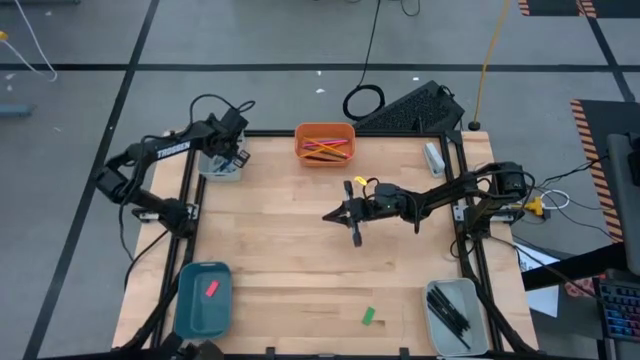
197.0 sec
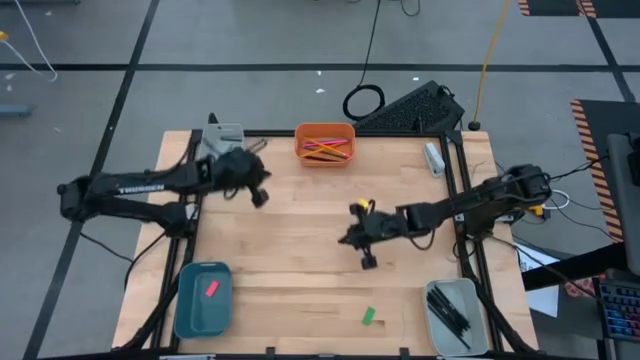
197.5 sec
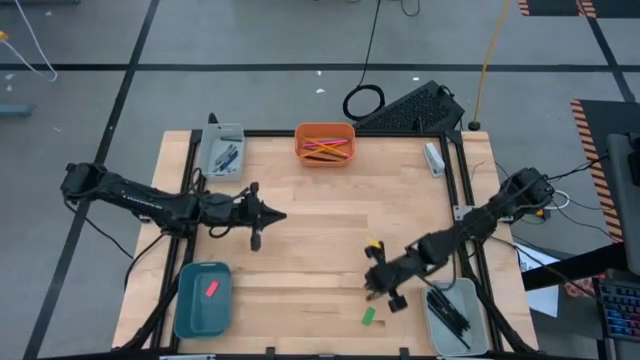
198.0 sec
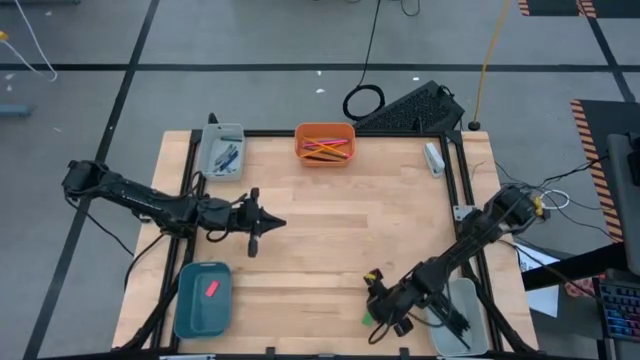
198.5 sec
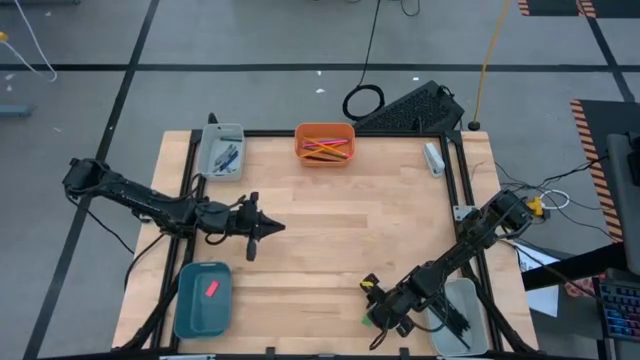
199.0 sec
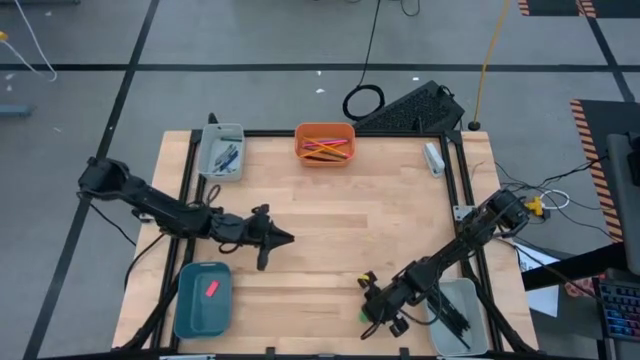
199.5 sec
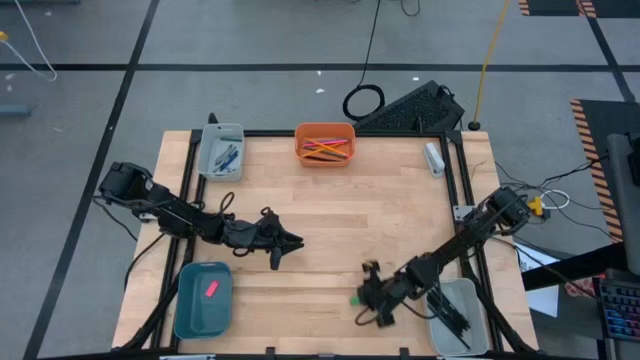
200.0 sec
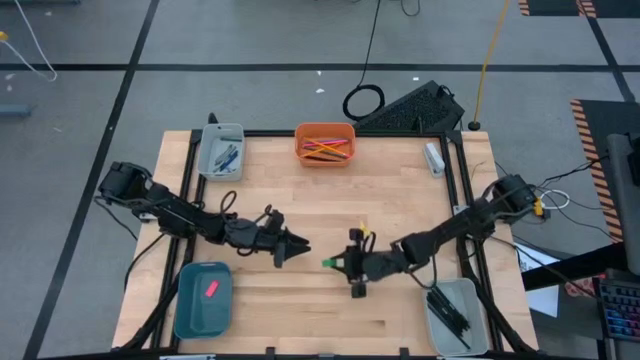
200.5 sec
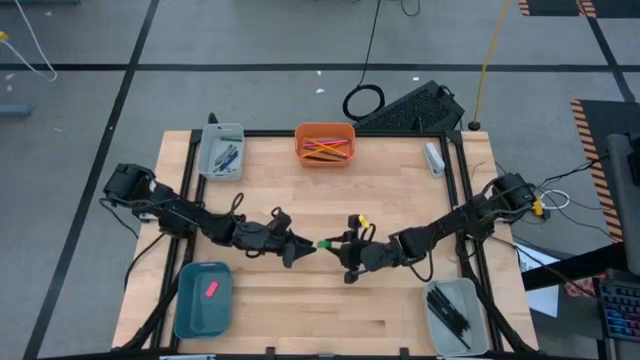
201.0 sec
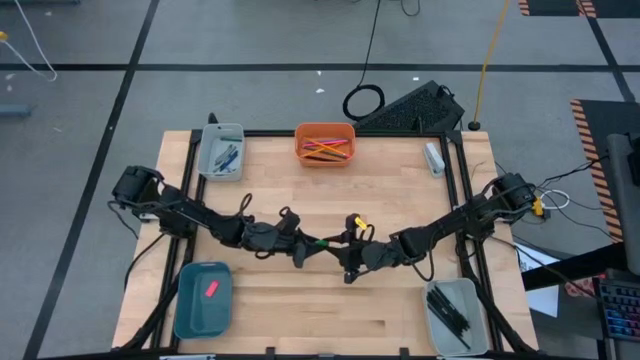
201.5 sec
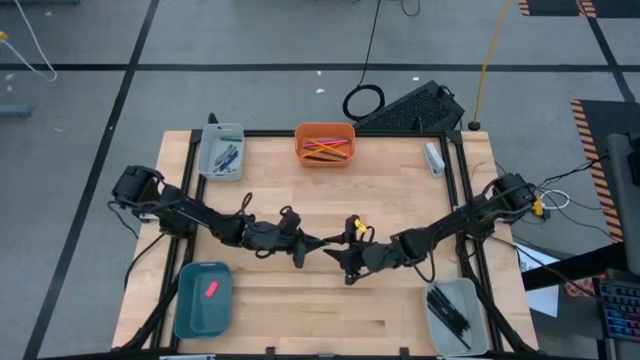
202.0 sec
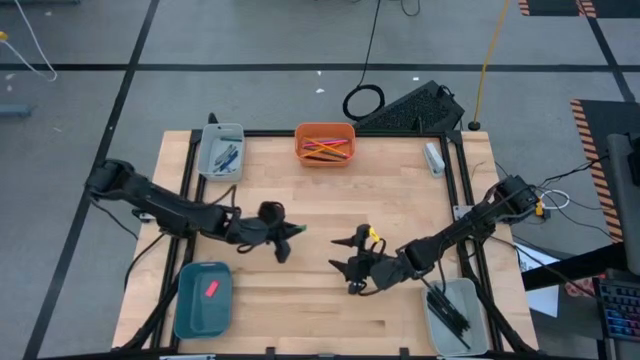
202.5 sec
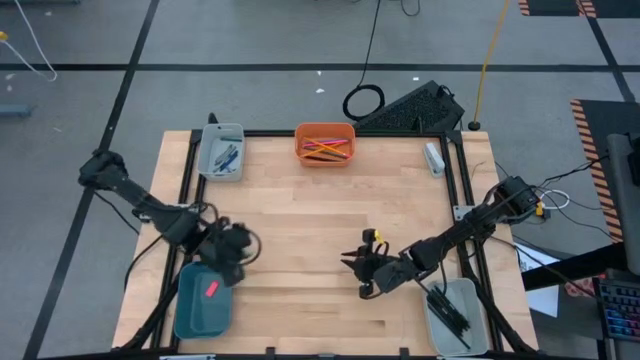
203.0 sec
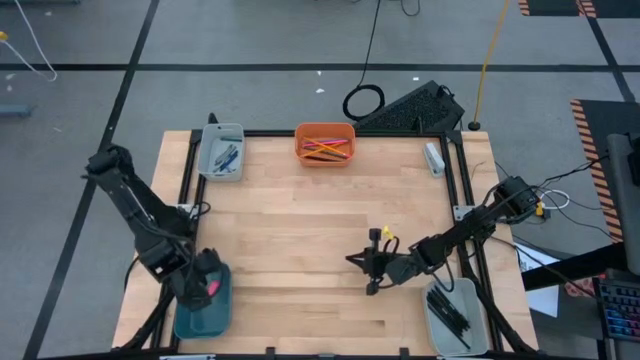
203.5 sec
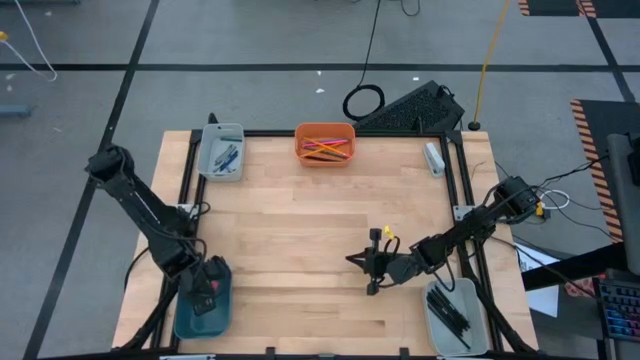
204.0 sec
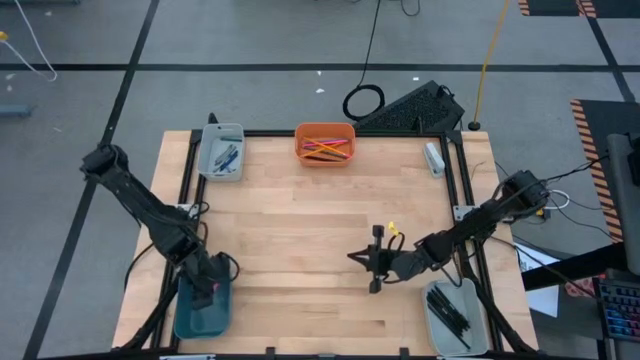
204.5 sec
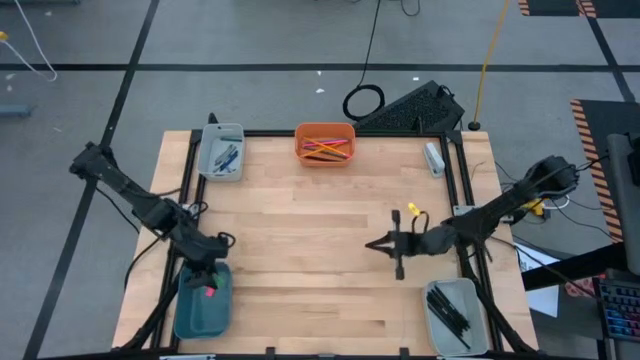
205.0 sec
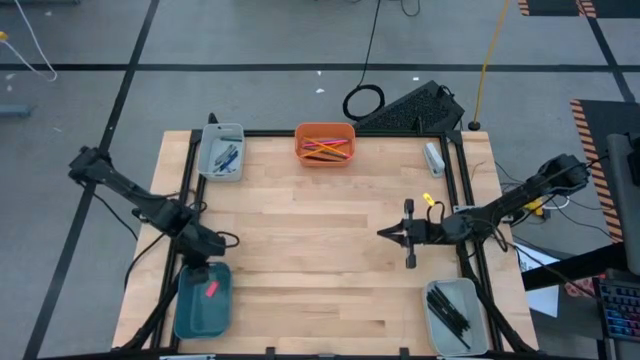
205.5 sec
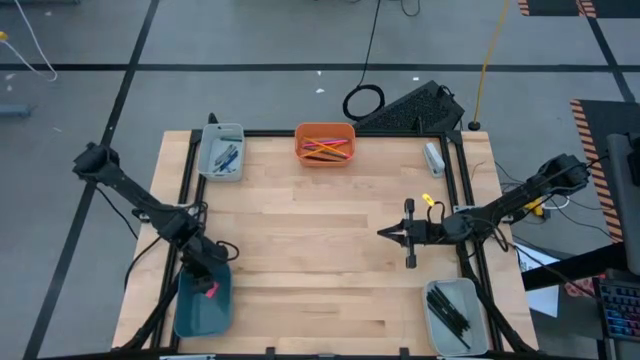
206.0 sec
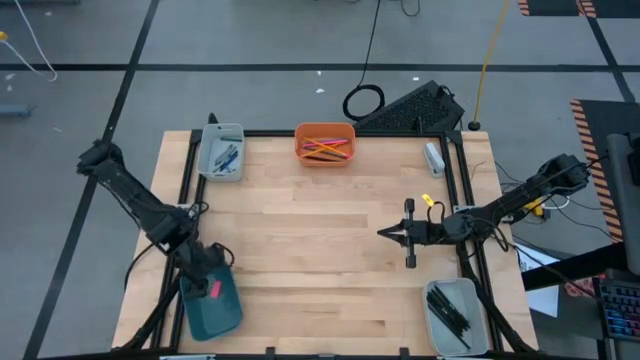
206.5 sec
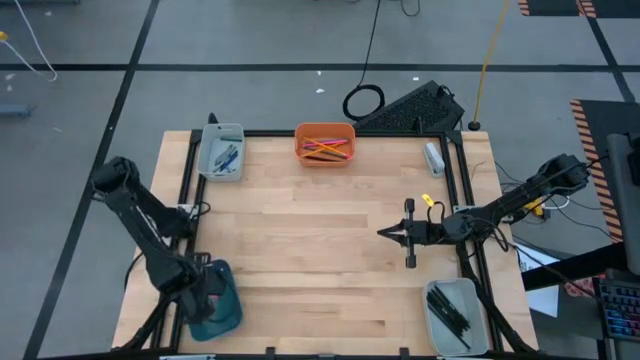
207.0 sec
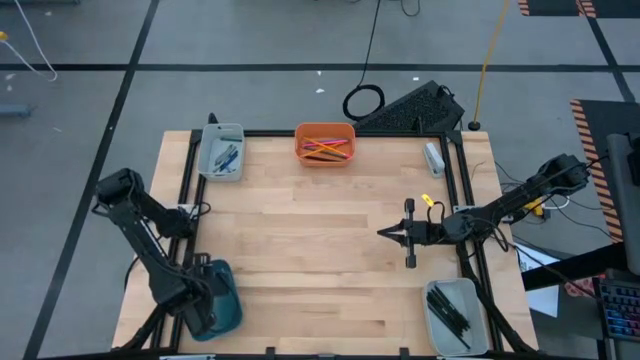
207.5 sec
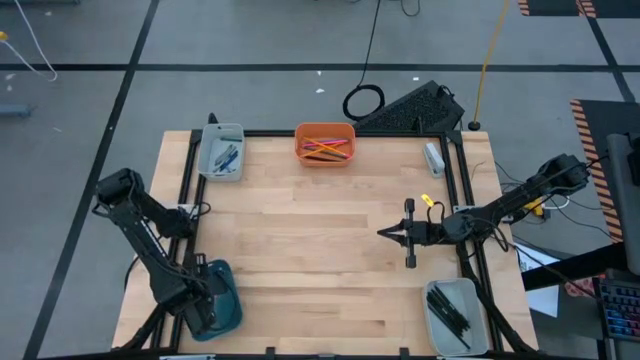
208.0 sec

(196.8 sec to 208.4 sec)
Task: Sort crayons/erasers/pens/pencils in bins
Put the green eraser into the blue bin

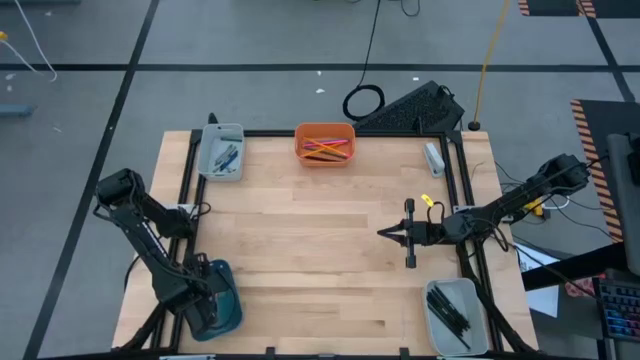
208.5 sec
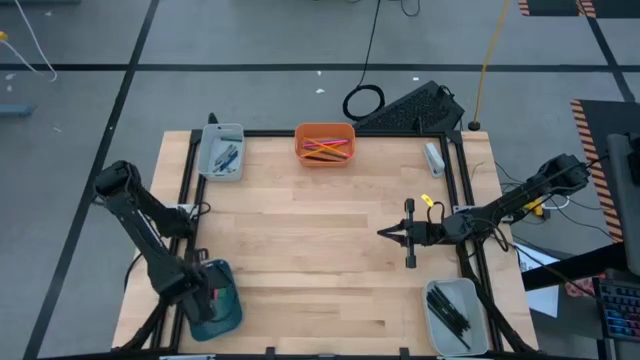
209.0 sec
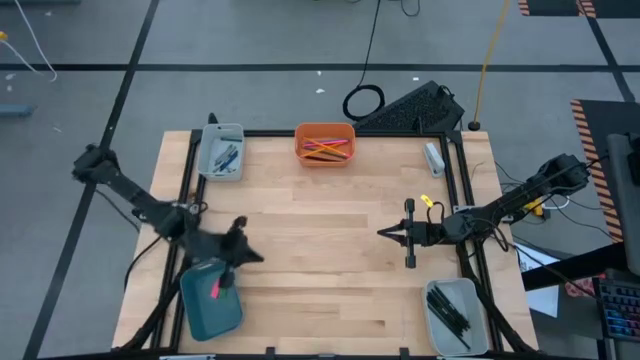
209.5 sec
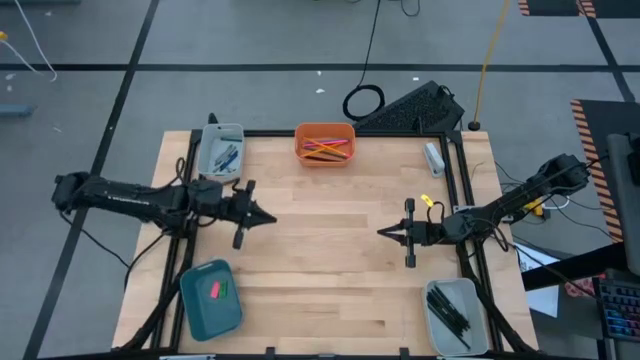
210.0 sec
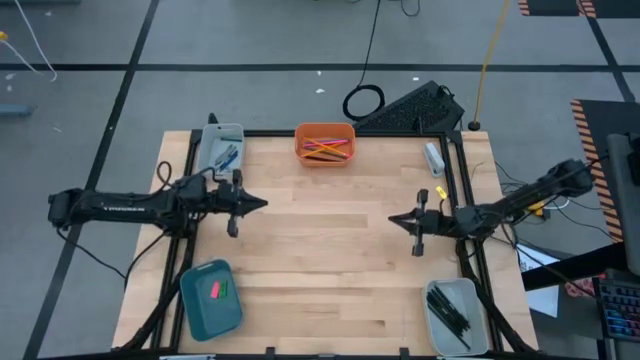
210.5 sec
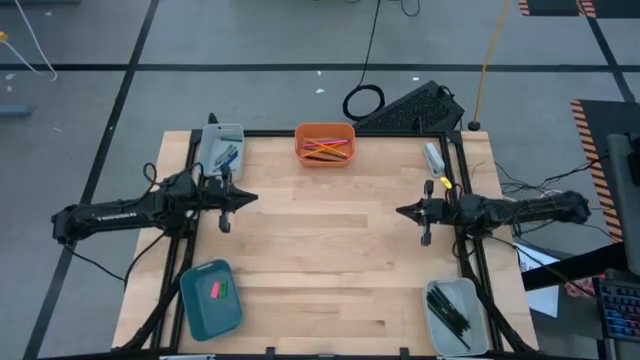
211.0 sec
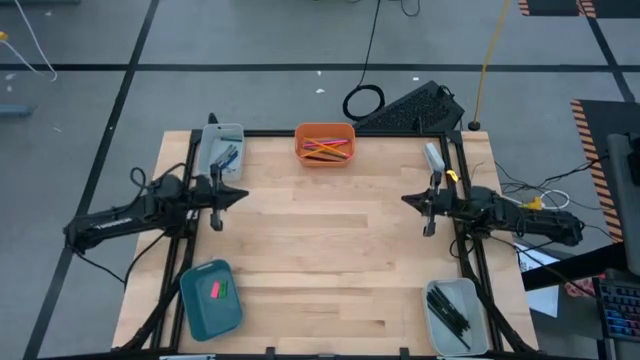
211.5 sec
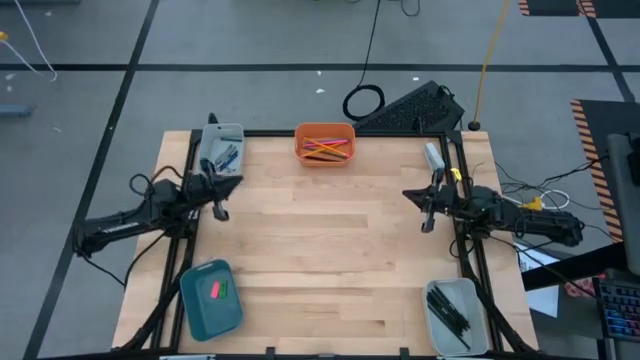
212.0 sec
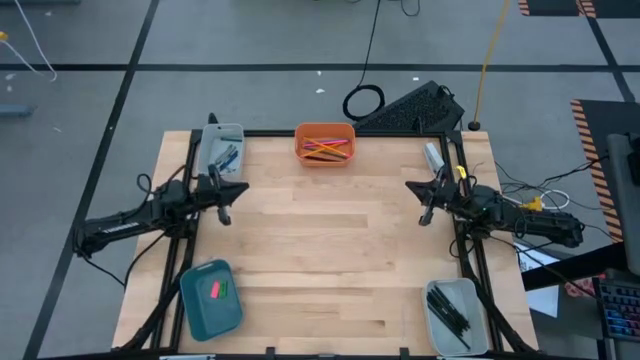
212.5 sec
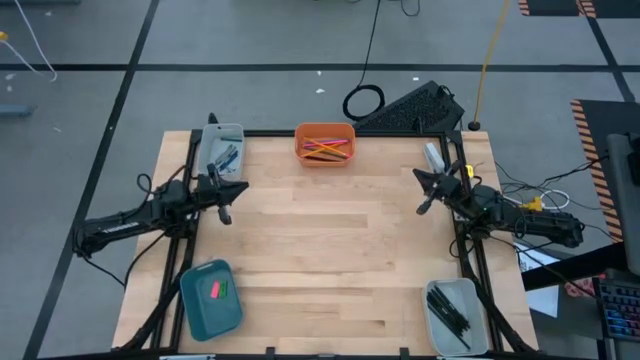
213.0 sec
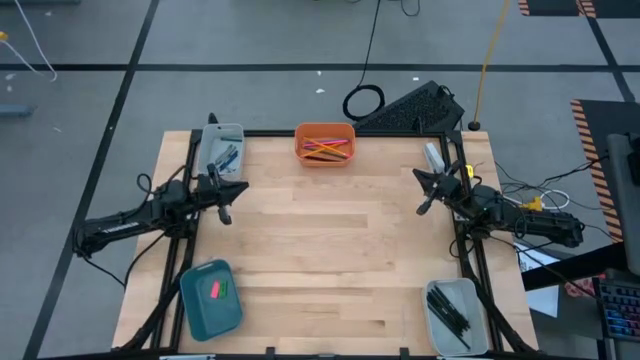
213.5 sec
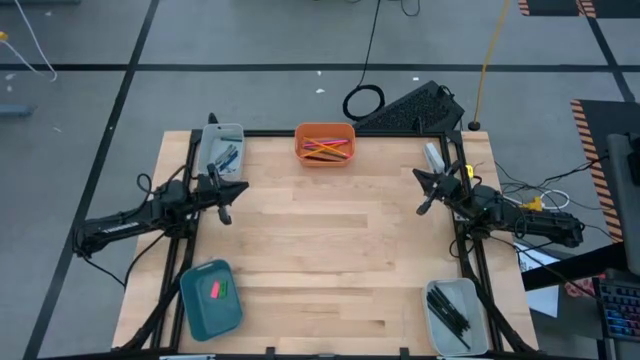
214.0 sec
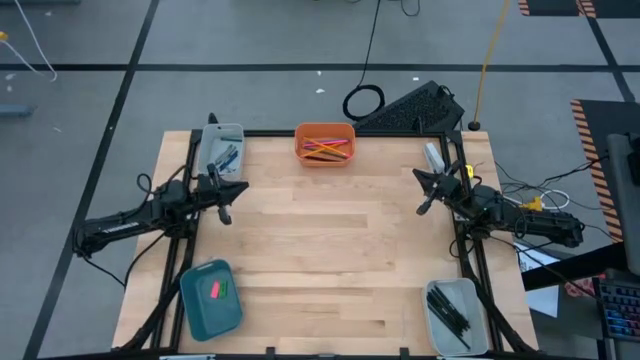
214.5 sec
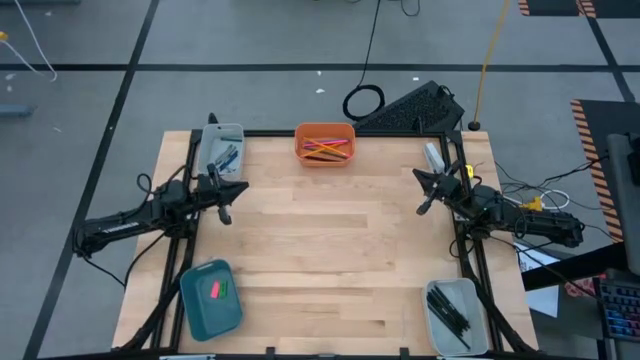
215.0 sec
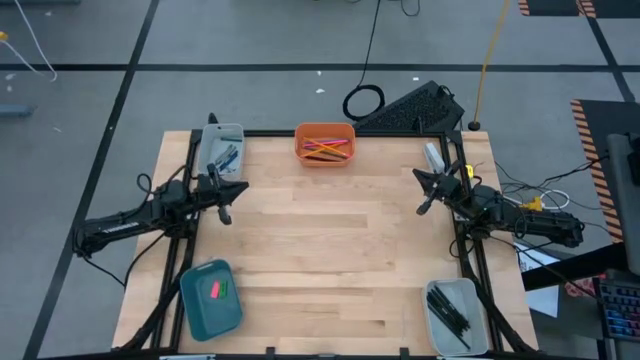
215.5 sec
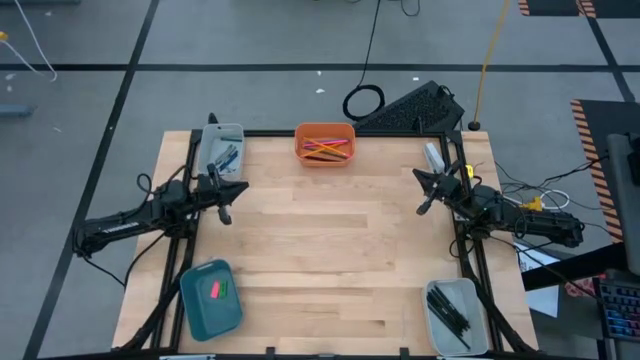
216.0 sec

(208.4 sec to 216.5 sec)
Return to Home Position
